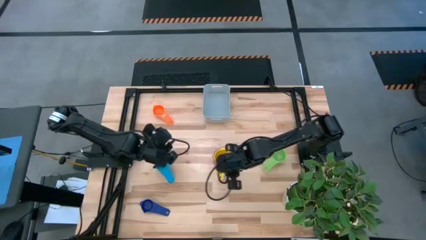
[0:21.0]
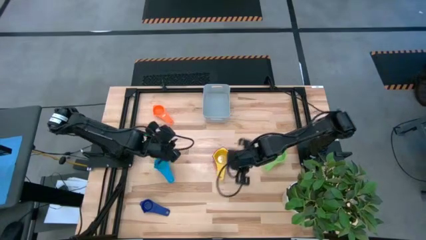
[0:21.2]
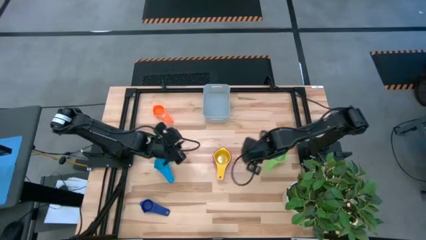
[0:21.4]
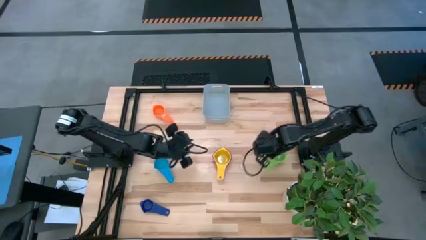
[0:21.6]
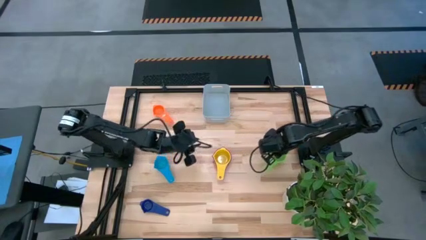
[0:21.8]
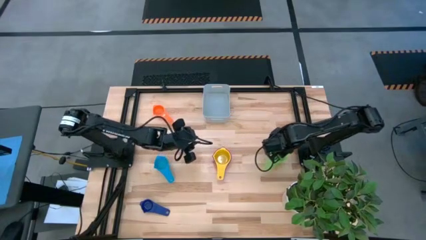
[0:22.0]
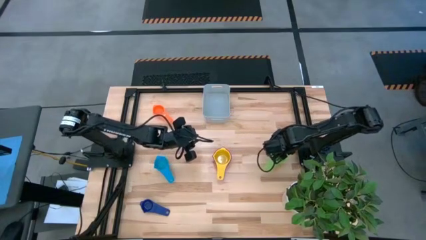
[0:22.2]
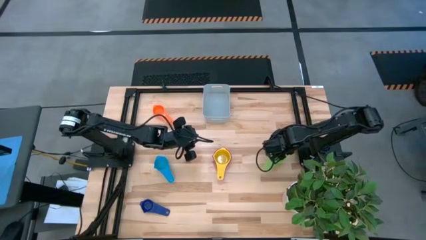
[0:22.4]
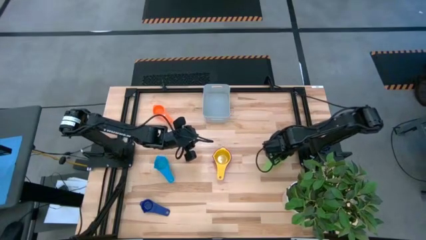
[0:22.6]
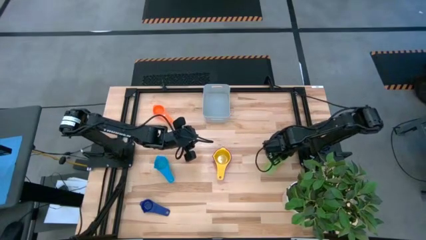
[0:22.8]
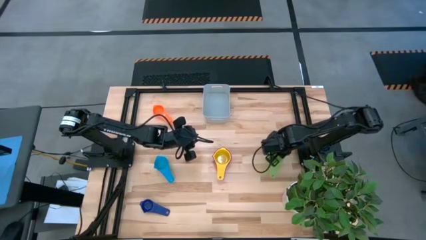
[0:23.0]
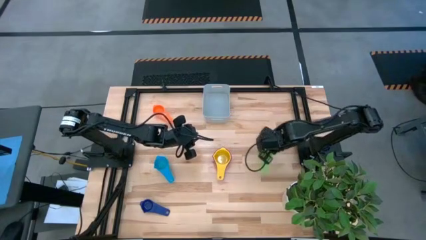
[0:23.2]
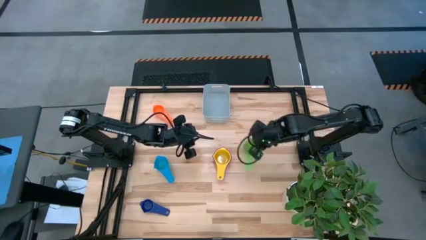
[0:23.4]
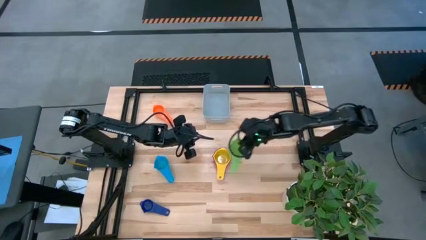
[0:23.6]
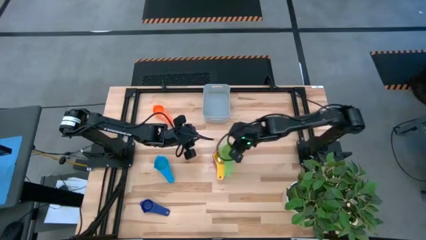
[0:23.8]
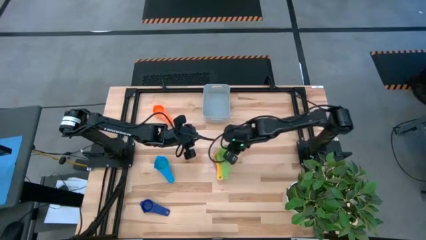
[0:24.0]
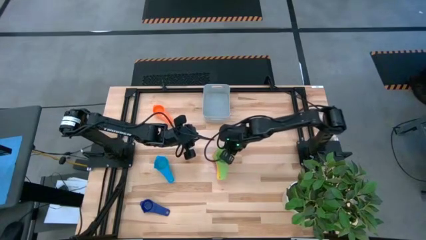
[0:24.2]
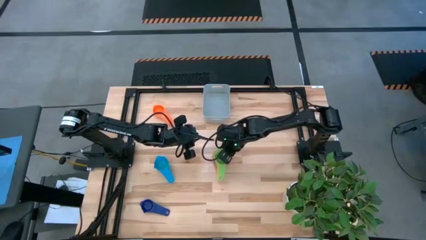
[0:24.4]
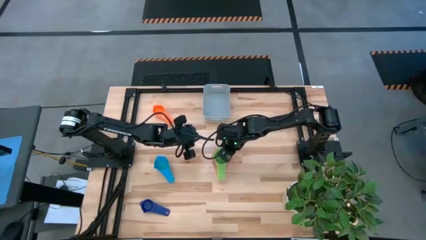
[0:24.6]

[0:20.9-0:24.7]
Task: Nest measuring cups in basket
Stack the green measuring cup on top of the yellow measuring cup

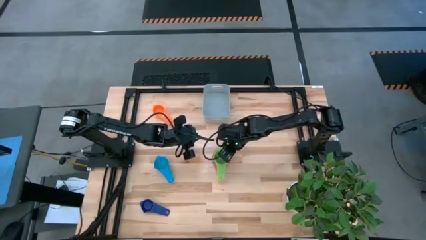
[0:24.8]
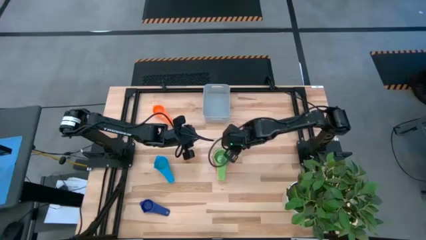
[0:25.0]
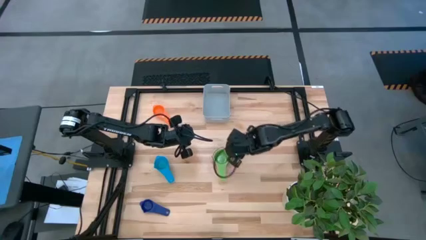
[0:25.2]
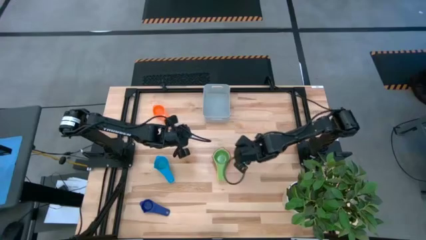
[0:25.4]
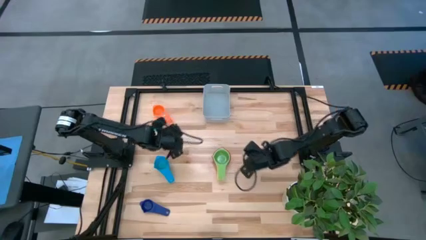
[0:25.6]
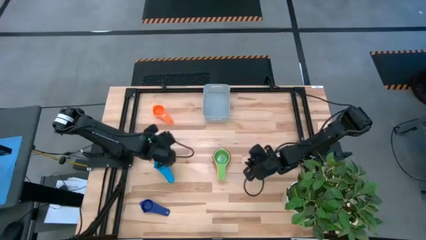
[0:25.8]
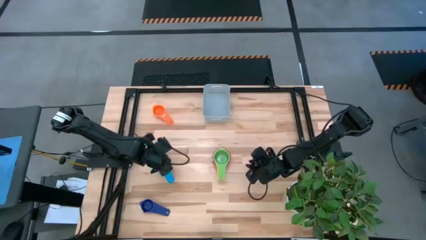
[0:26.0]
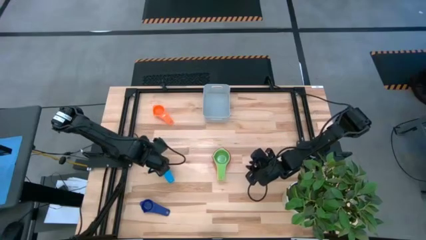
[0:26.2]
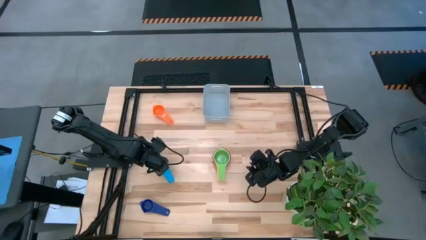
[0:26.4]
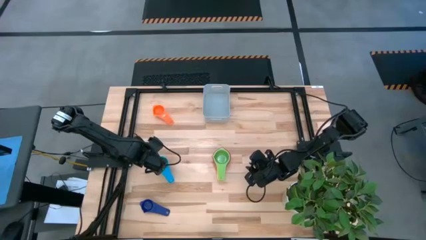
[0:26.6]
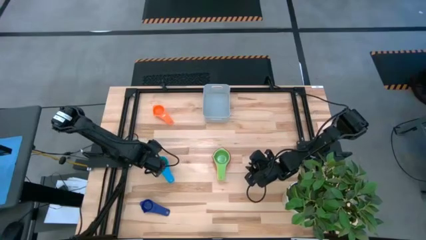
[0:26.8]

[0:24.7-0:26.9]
Stack the blue measuring cup on top of the green measuring cup

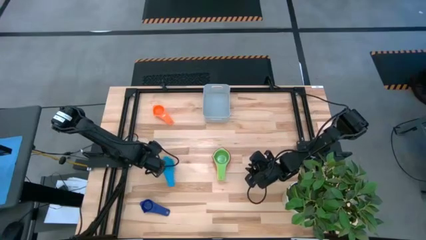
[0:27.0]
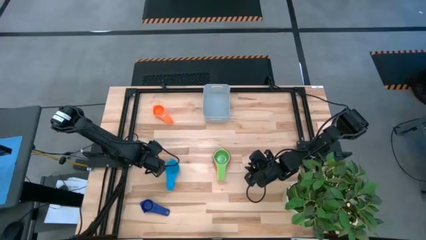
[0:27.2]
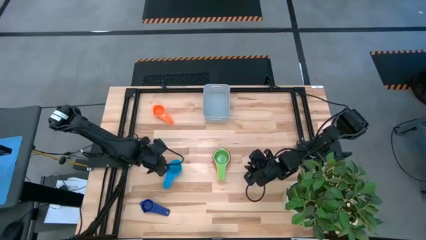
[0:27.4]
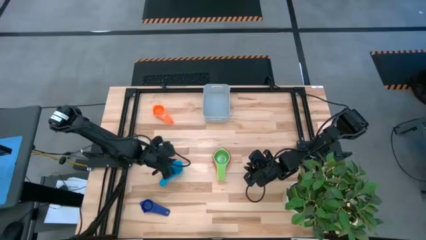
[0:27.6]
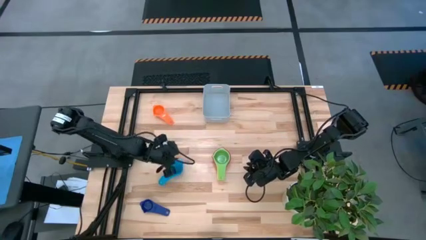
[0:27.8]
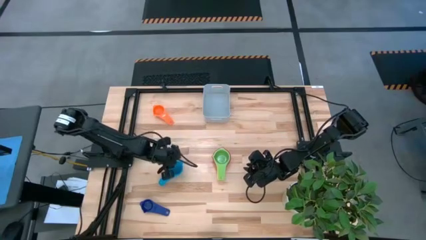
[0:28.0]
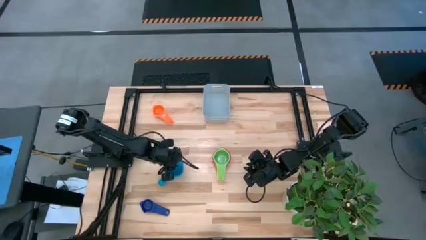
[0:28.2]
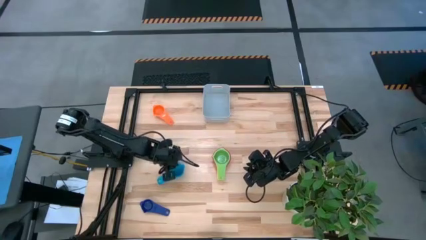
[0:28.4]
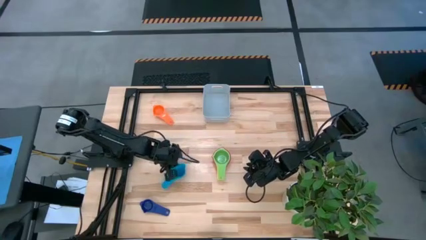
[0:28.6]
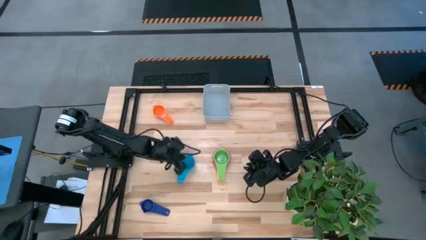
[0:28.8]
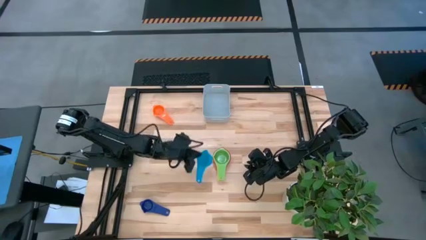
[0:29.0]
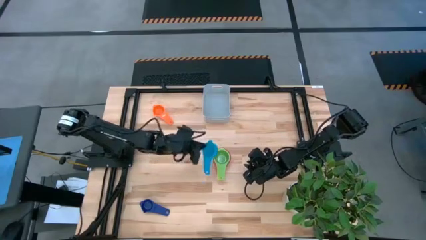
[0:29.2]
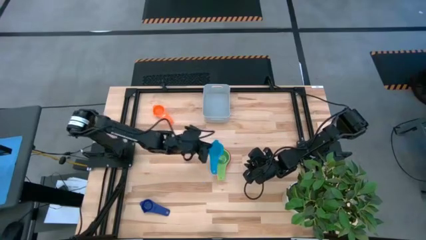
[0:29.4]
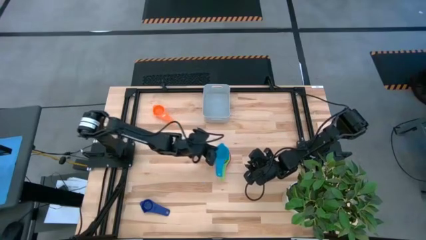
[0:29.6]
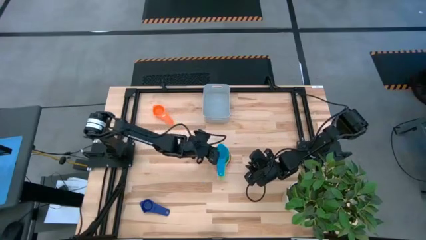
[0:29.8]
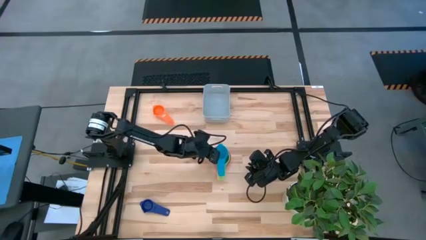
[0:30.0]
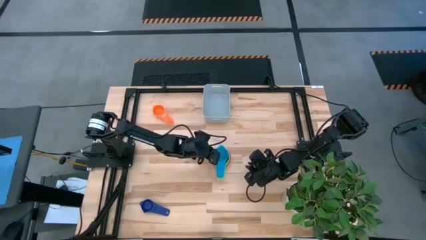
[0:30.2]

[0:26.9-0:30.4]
Stack the blue measuring cup on top of the green measuring cup

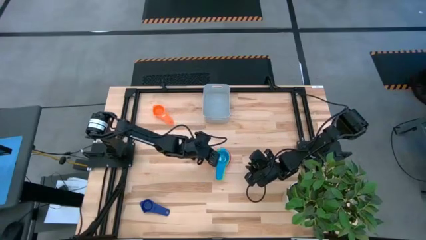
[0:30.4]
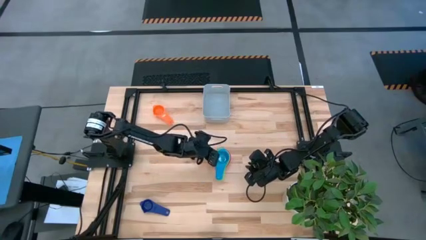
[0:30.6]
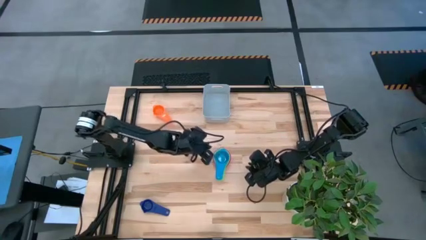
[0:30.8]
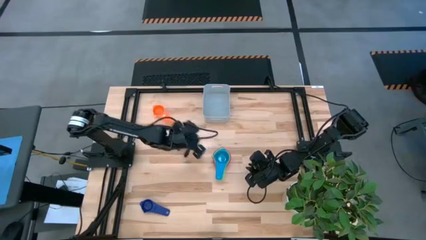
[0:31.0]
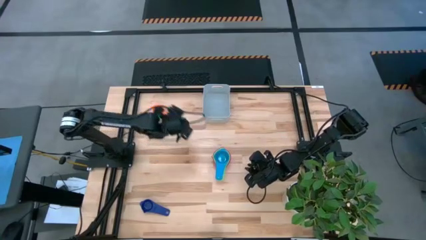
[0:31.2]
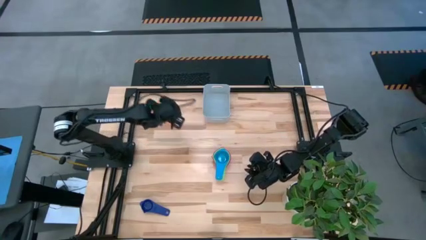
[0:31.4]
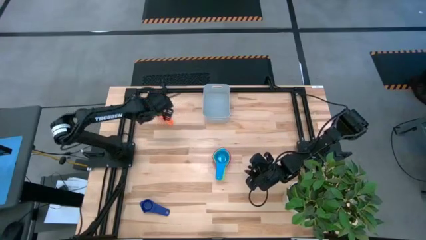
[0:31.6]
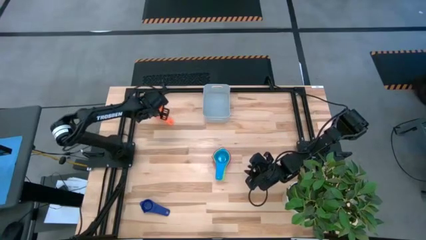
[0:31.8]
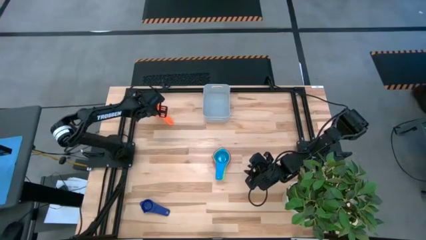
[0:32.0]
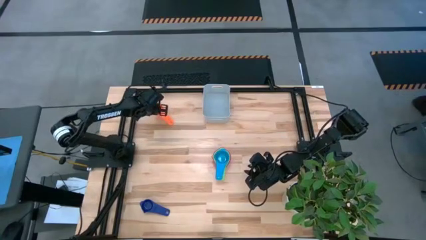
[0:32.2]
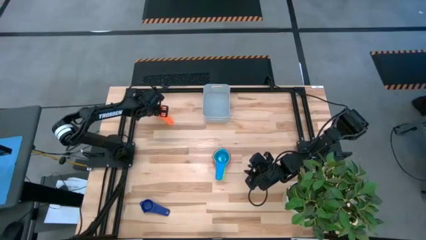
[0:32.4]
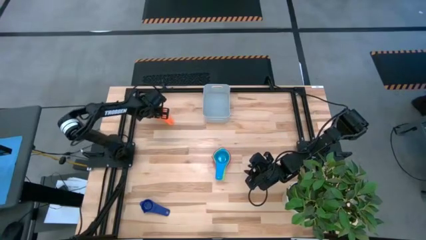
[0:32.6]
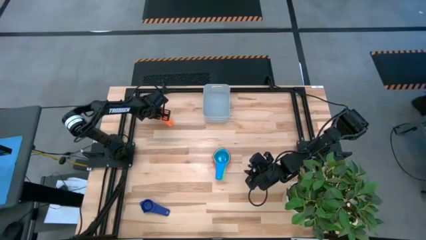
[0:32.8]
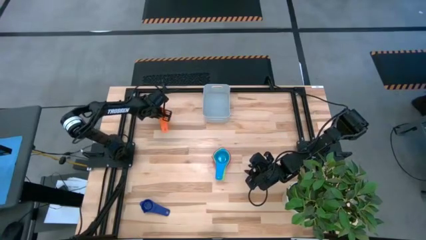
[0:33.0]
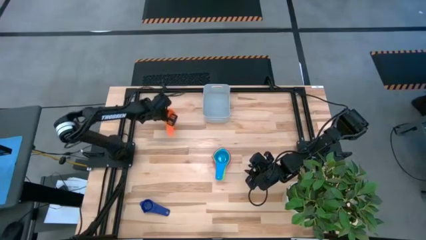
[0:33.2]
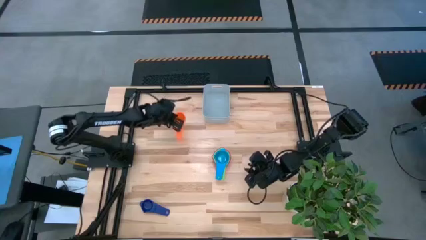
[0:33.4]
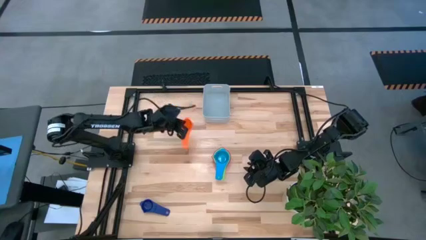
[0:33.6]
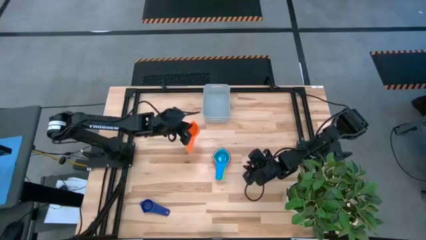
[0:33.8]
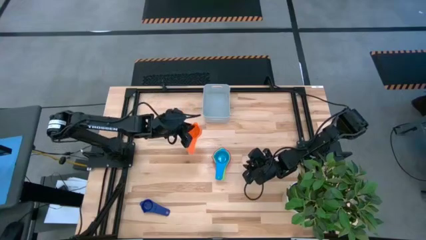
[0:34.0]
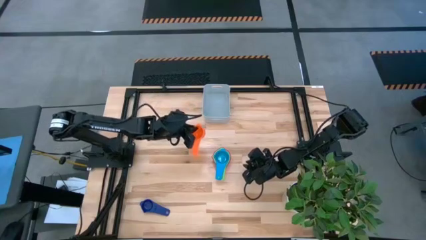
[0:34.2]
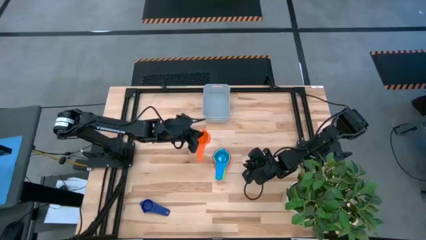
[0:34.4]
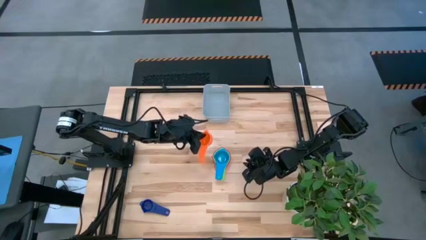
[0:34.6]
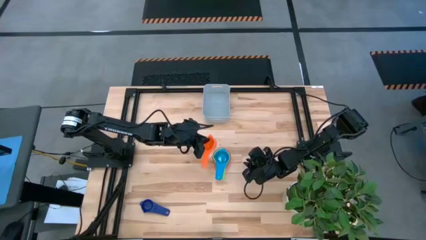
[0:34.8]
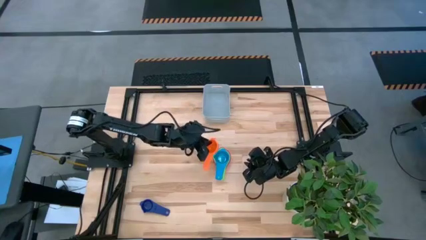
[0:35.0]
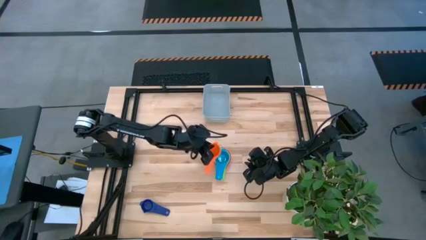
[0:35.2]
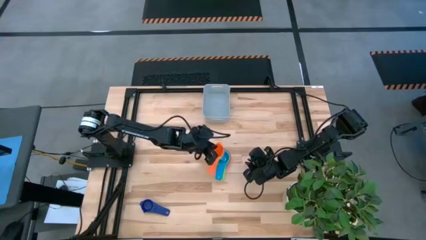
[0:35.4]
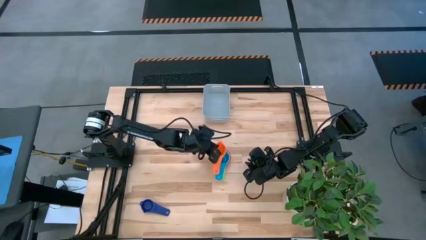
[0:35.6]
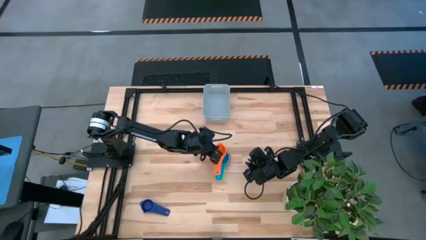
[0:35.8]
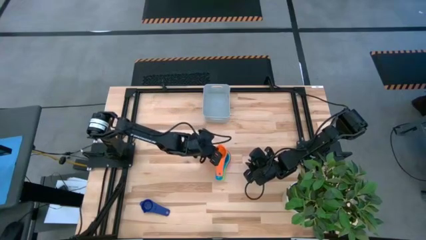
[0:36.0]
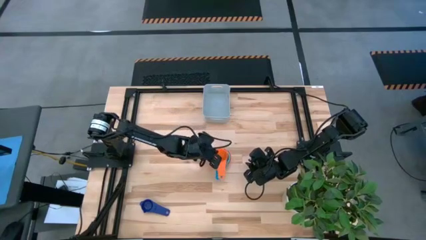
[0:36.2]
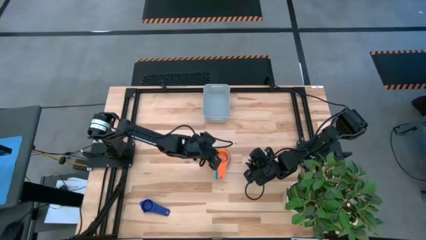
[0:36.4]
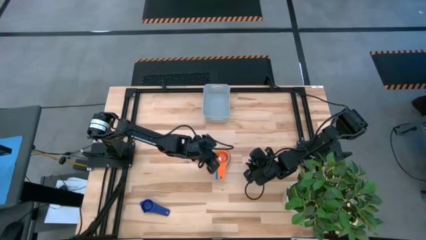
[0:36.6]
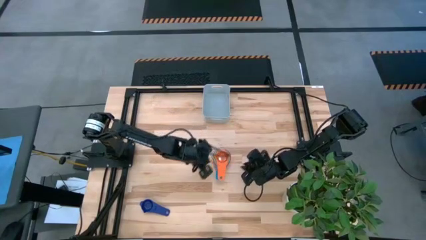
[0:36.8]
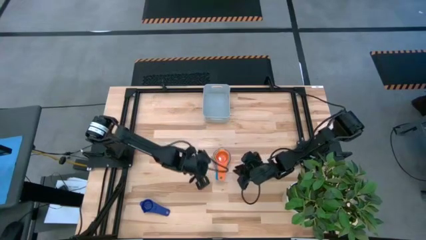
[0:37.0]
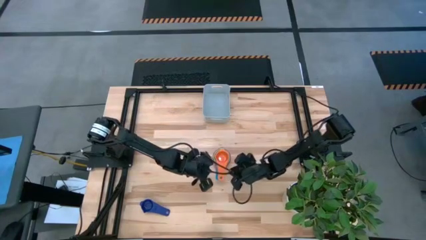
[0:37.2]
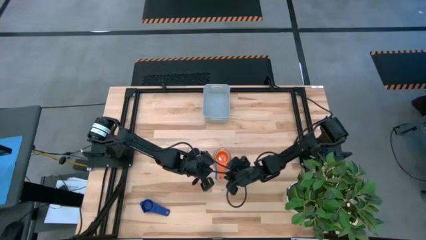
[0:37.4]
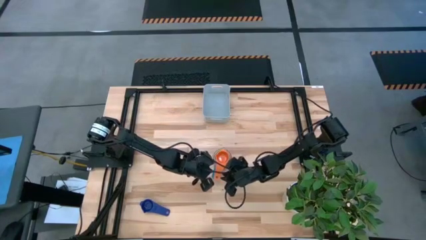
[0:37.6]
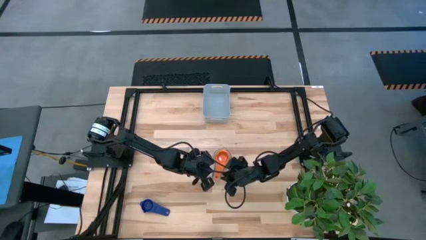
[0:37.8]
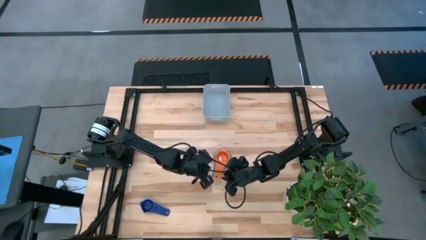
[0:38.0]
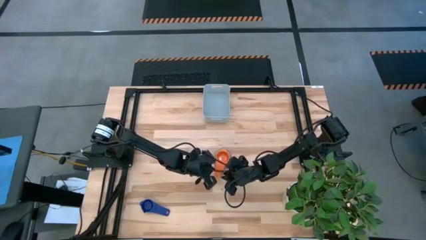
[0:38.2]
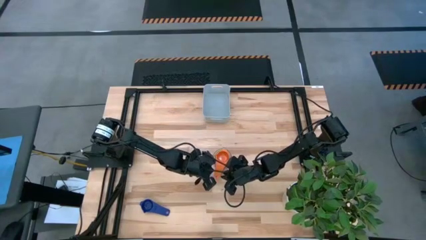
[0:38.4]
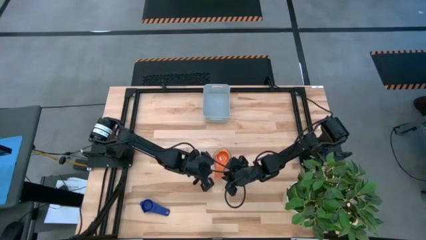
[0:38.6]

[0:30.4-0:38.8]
Stack the orange measuring cup on top of the blue measuring cup
